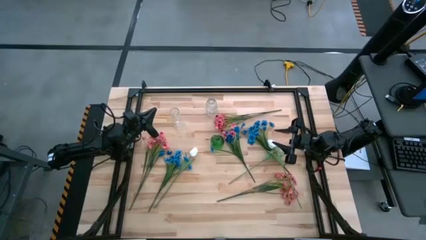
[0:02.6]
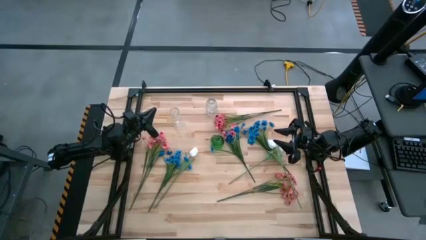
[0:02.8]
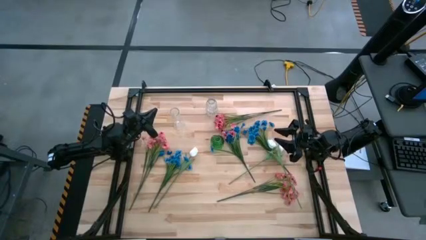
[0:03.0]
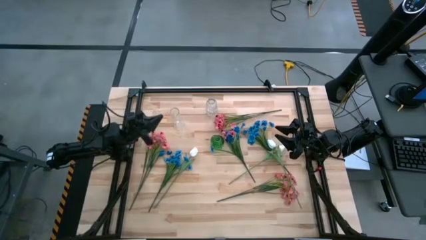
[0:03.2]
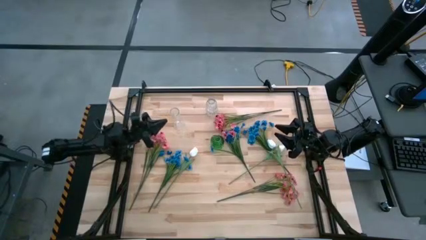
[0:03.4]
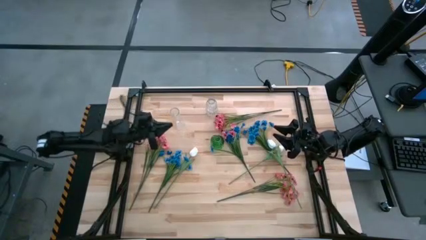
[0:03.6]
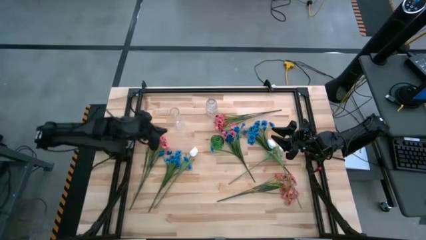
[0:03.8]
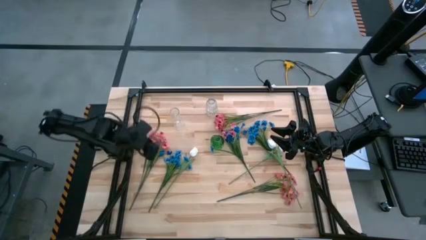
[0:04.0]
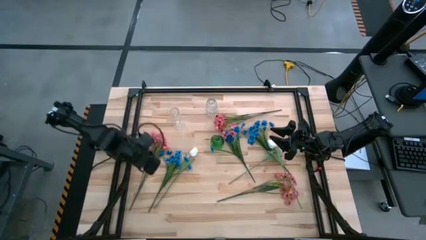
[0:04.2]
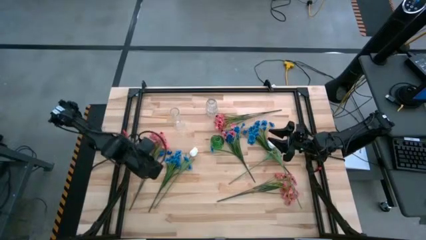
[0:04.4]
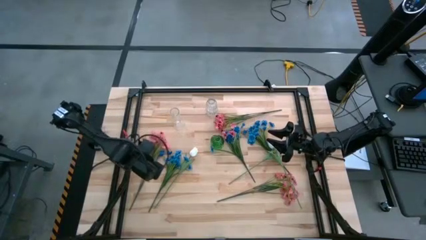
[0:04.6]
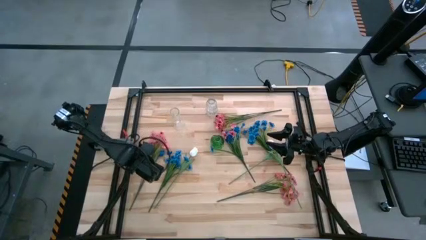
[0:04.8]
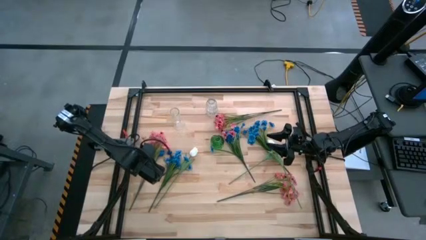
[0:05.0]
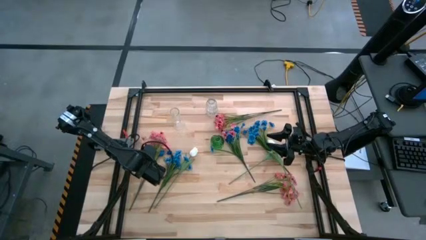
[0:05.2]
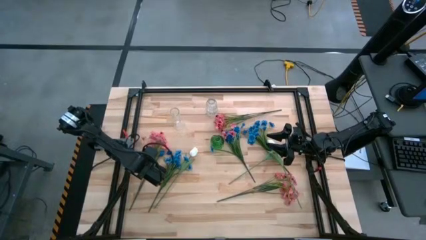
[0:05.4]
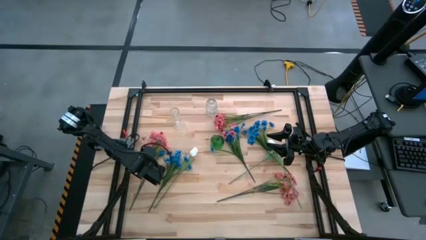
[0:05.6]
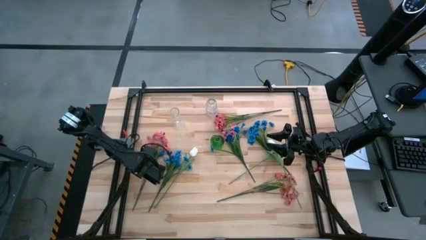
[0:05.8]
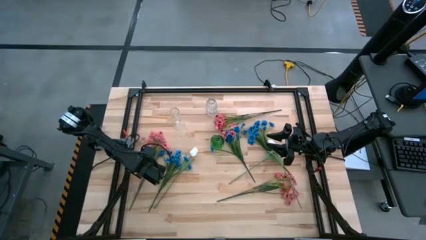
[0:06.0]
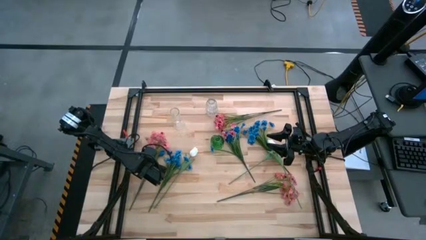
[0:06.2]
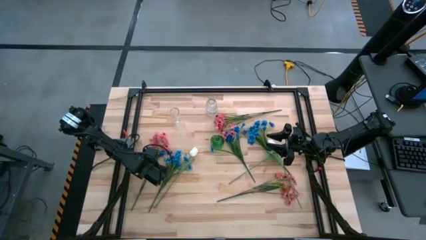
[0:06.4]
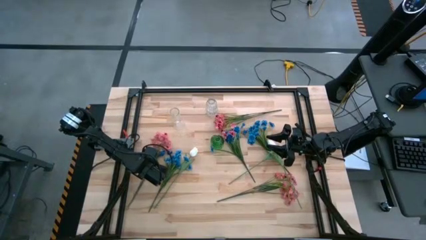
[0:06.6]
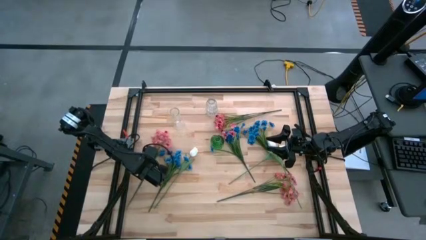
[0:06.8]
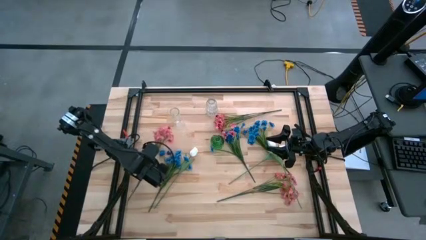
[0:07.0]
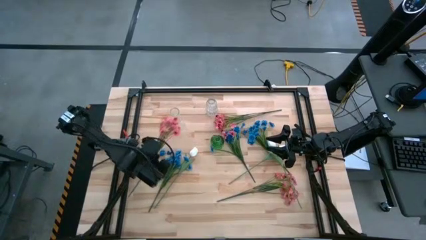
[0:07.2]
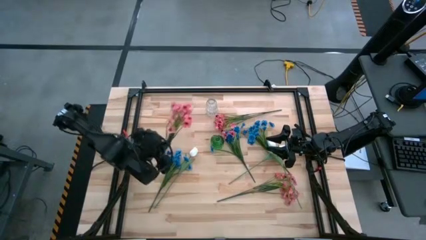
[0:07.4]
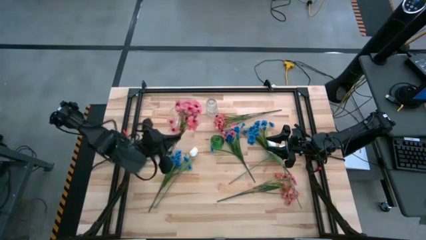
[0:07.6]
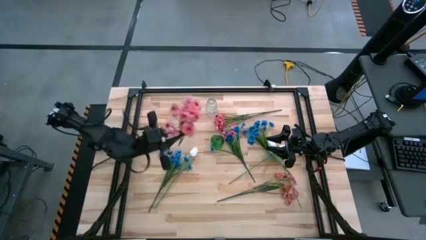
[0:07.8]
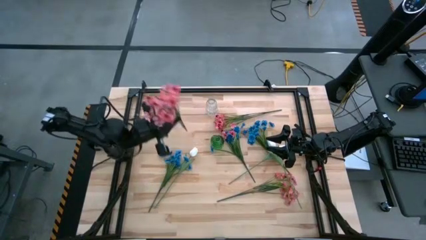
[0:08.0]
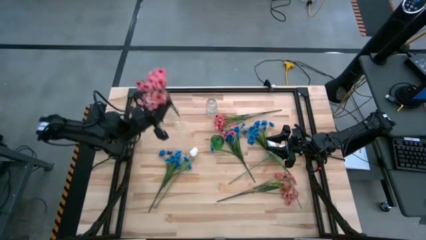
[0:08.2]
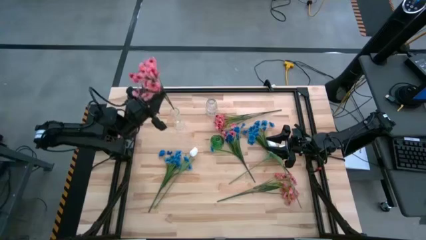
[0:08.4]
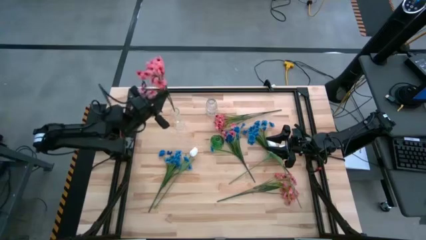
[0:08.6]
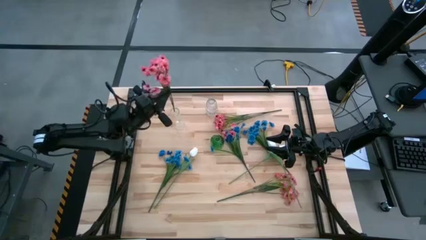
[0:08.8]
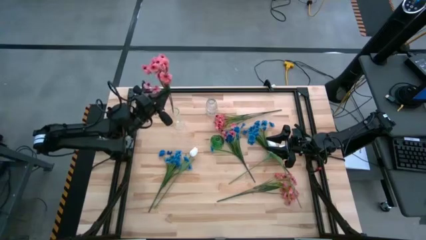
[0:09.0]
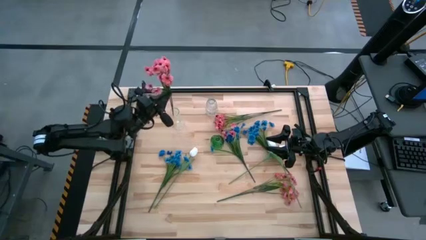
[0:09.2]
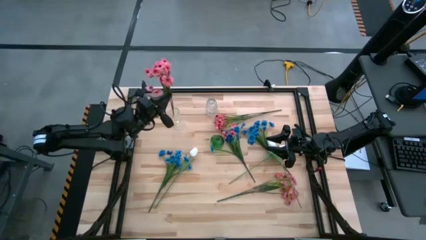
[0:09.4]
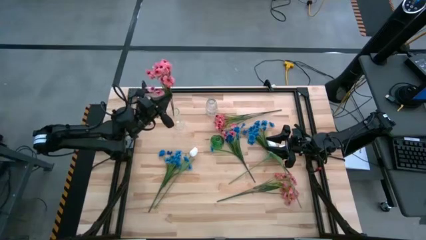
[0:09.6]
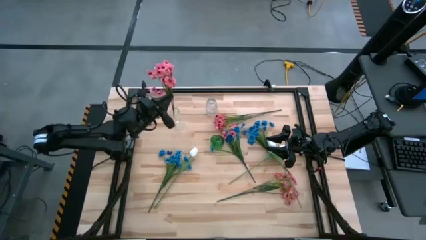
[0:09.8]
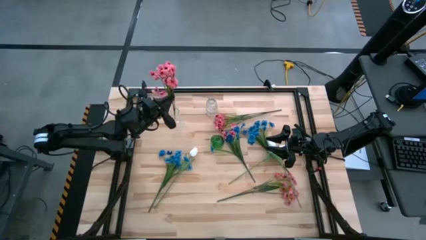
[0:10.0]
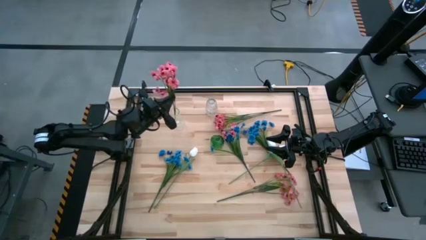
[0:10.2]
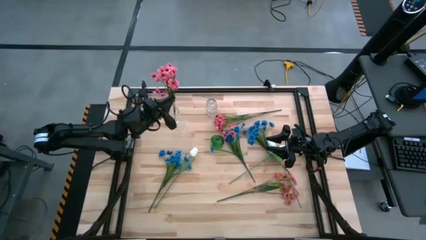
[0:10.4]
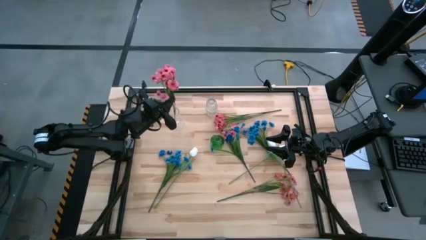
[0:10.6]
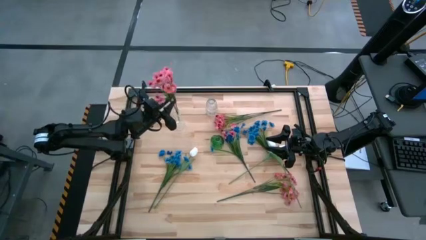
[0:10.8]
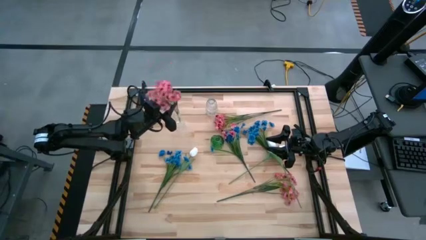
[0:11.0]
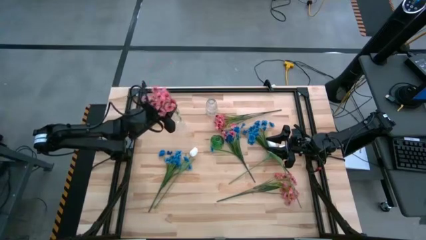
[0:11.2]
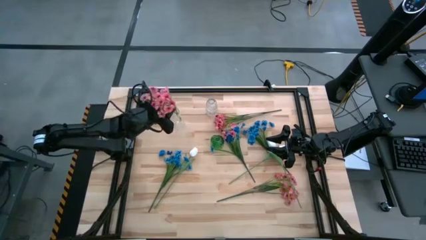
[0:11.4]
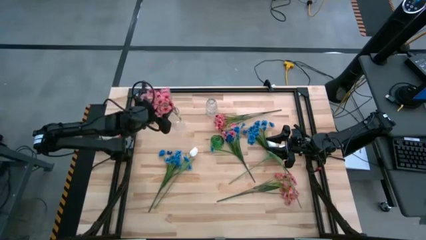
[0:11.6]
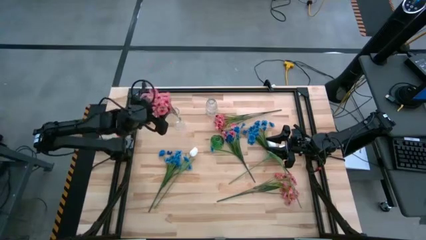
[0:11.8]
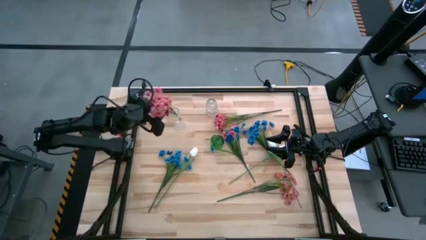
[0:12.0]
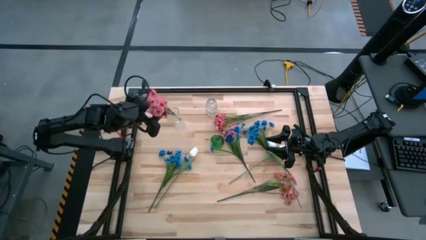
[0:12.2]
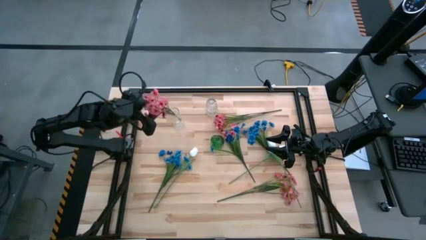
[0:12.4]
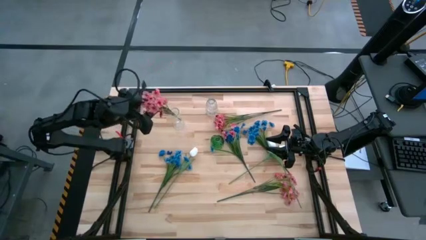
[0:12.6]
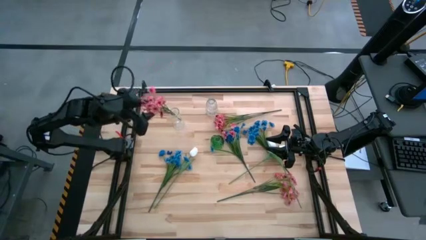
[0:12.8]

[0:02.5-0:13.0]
Task: Sort flowers into vase by color
Put the middle left pink flowers into the left transparent vase

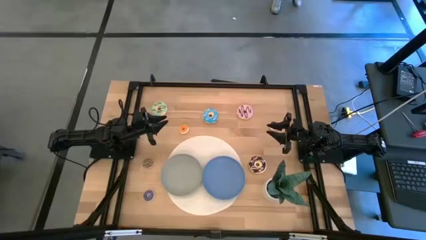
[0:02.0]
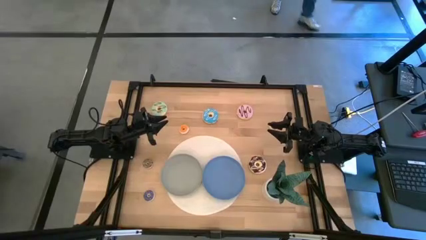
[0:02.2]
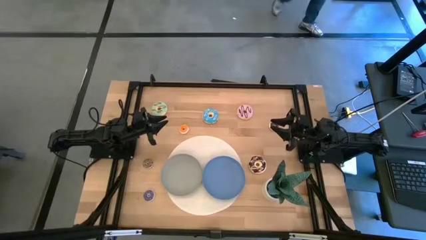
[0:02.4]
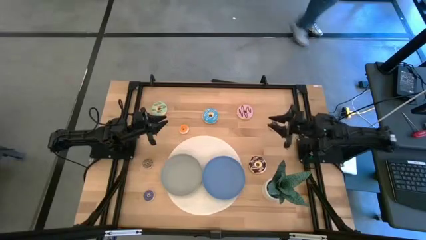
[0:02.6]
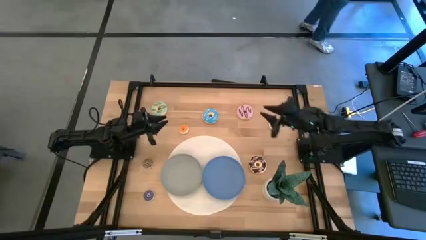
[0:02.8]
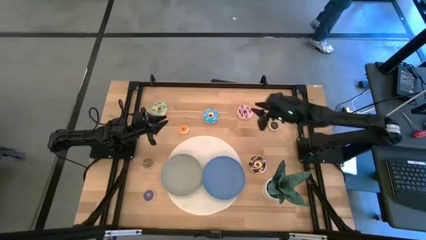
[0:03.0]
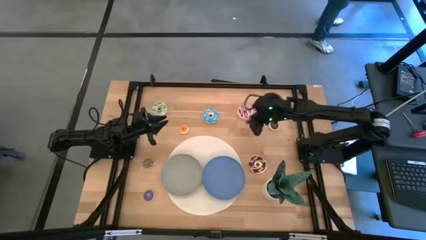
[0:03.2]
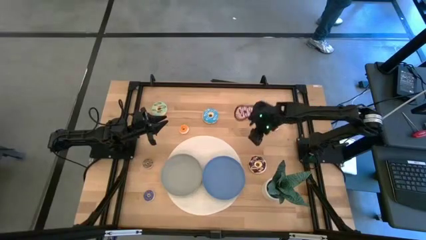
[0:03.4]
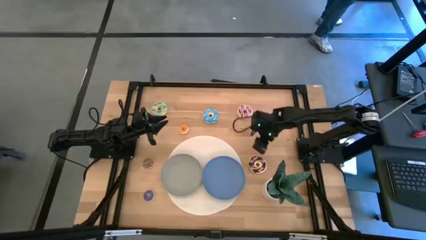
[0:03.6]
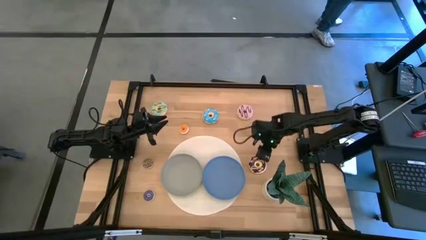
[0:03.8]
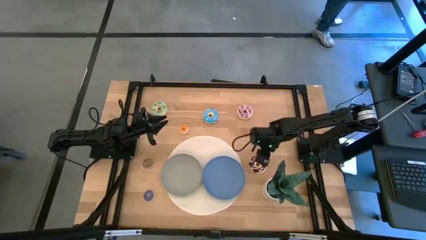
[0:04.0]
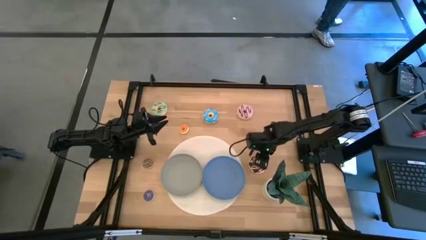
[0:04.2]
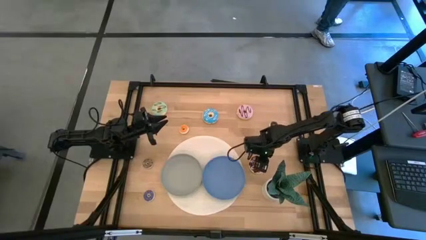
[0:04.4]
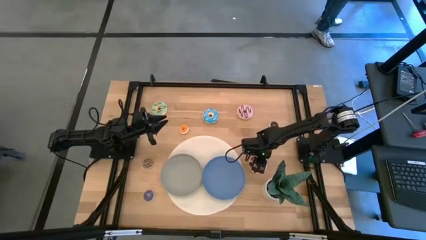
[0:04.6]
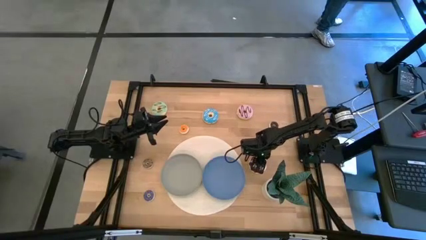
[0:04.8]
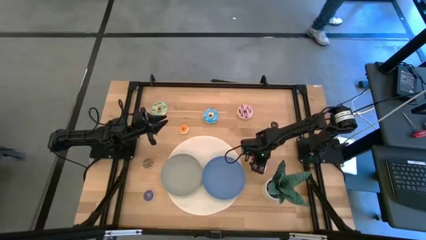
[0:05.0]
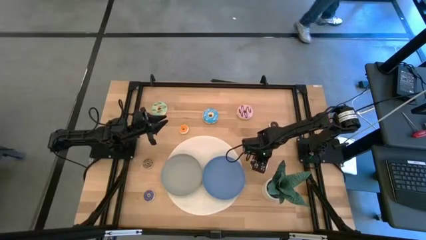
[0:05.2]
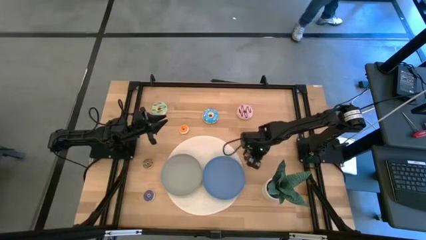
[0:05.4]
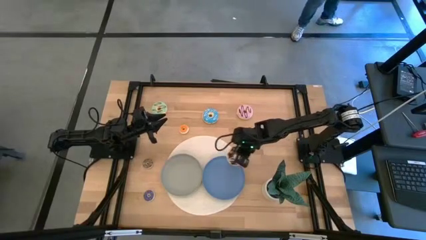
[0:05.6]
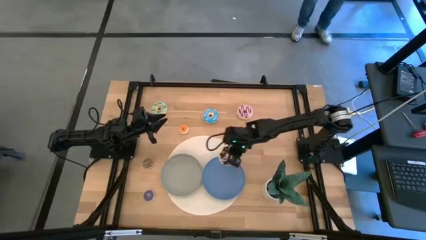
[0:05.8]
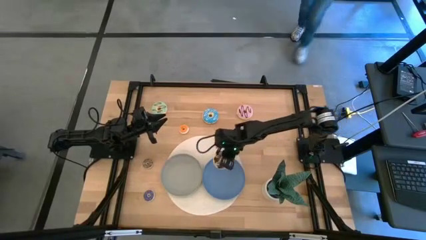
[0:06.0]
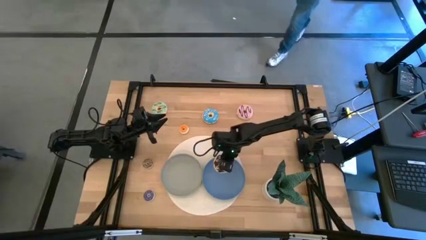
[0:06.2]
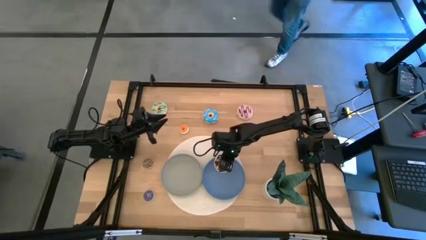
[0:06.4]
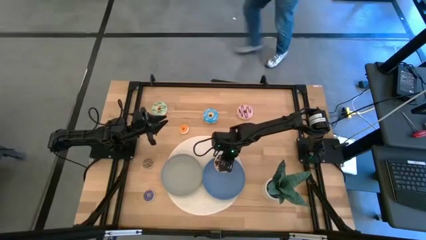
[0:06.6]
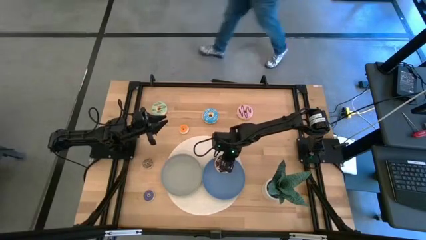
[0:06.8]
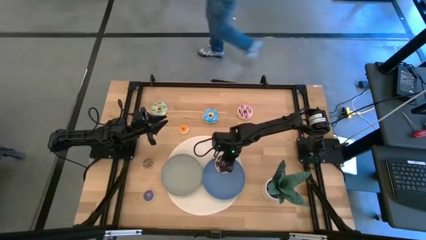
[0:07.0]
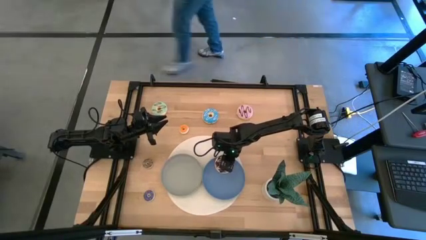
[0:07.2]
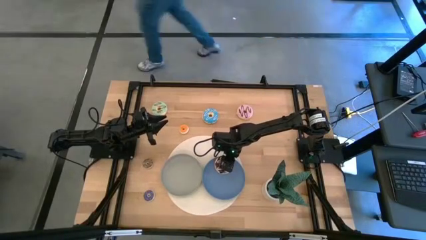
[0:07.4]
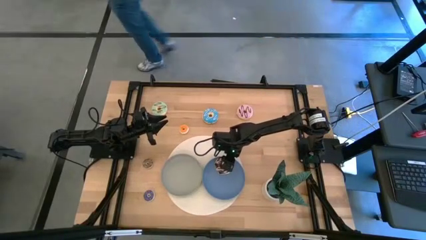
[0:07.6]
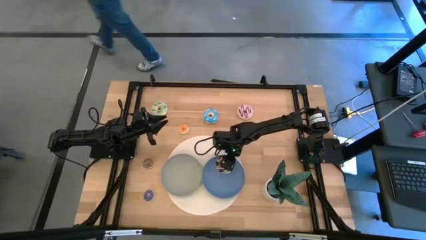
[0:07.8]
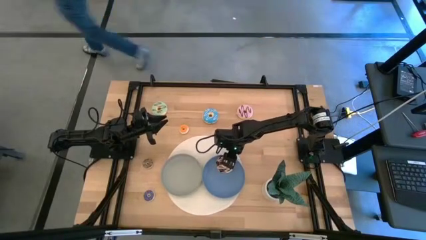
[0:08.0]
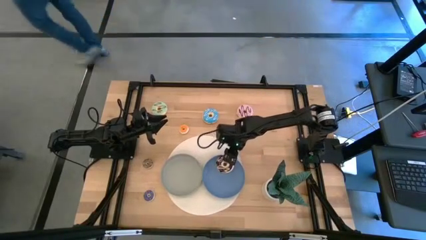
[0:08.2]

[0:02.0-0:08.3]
Task: Pick & Place donuts
Put the big brown donut on the blue plate
